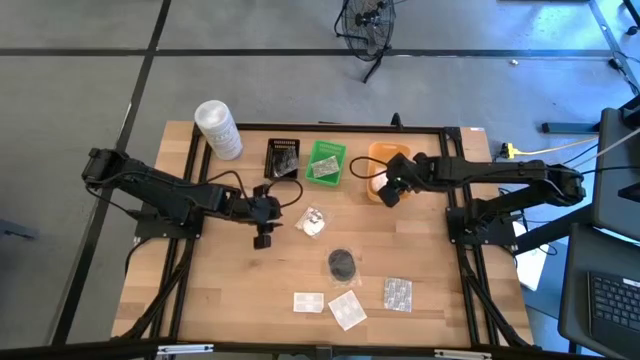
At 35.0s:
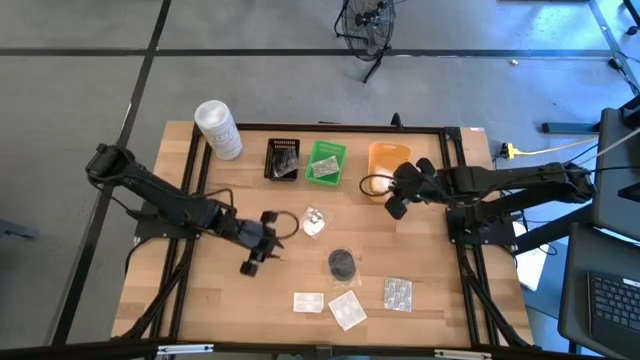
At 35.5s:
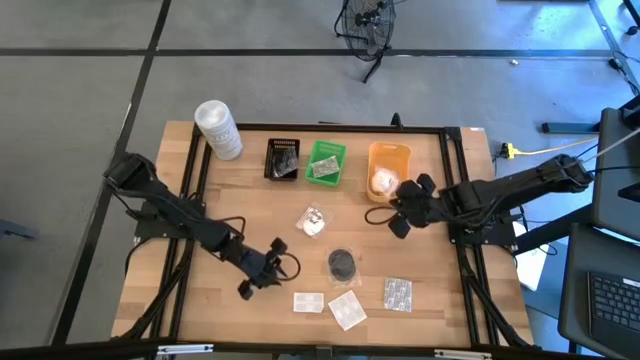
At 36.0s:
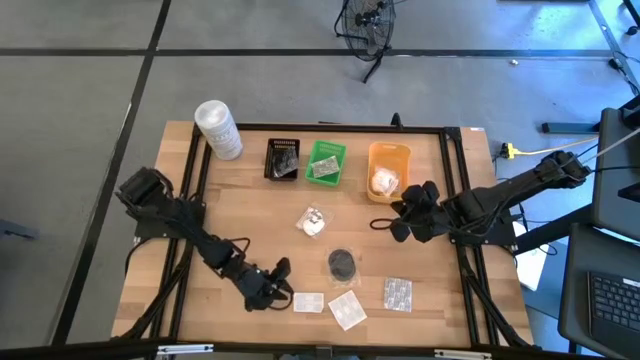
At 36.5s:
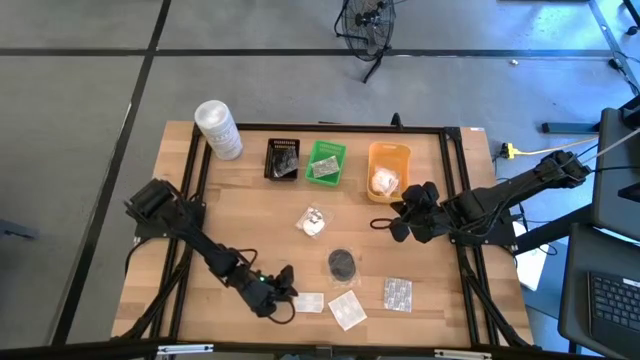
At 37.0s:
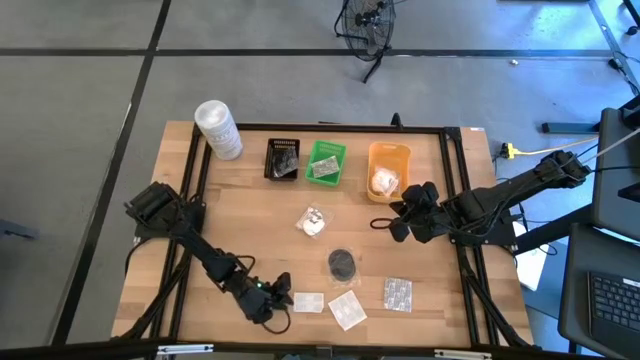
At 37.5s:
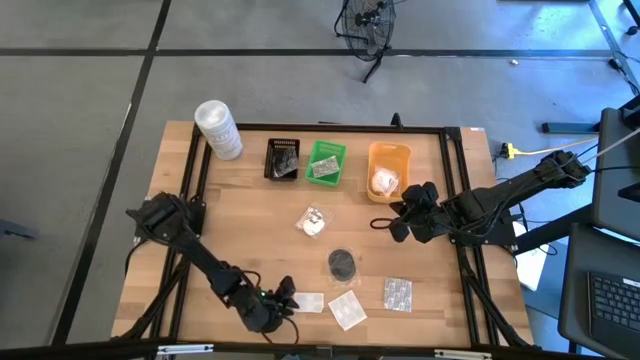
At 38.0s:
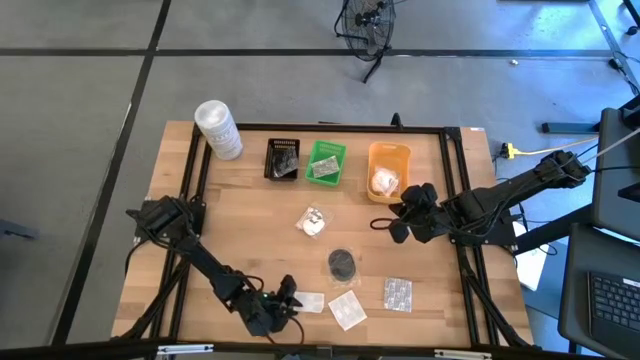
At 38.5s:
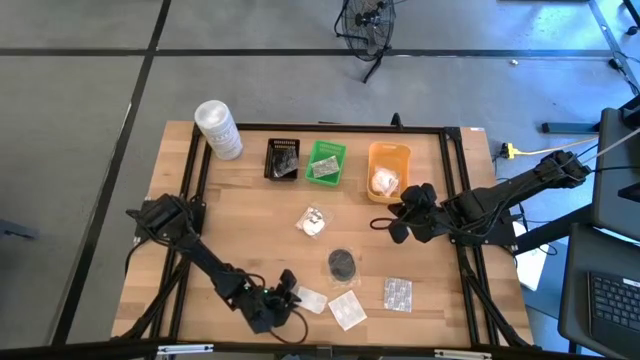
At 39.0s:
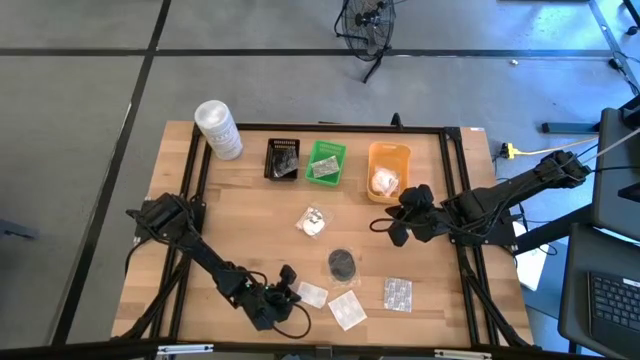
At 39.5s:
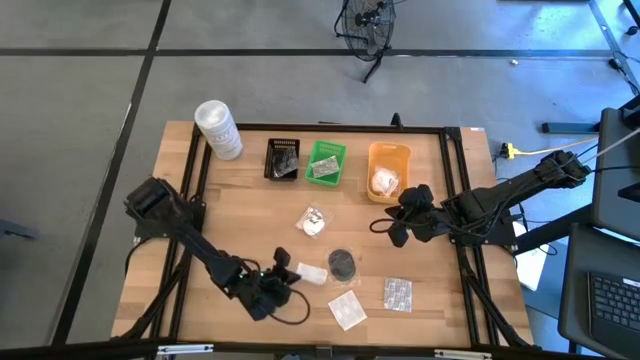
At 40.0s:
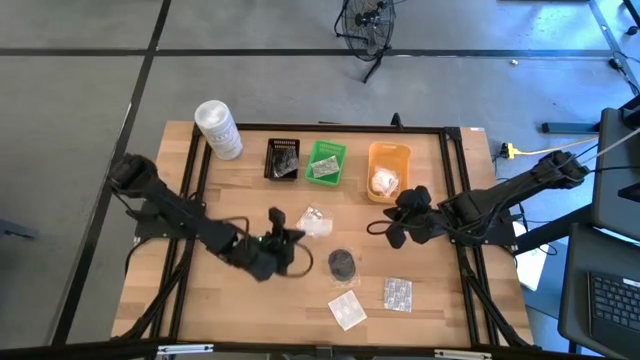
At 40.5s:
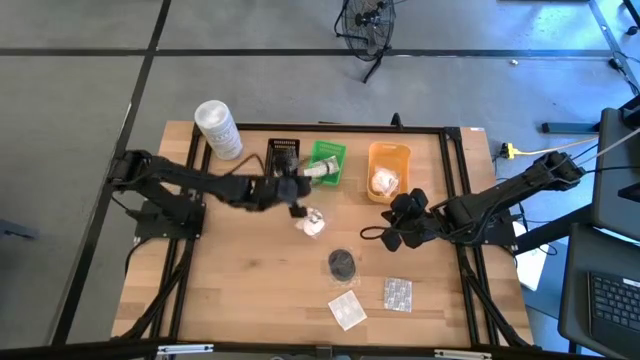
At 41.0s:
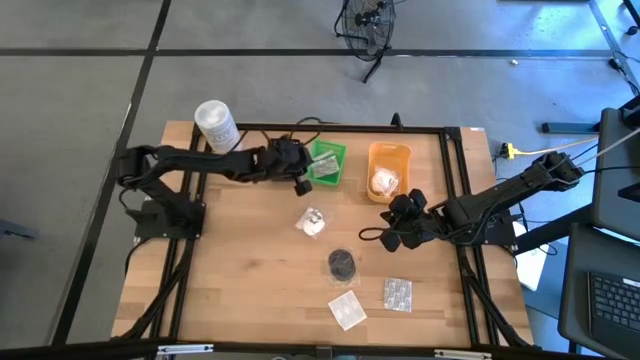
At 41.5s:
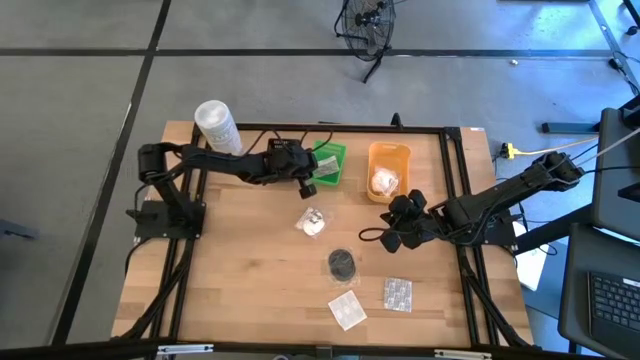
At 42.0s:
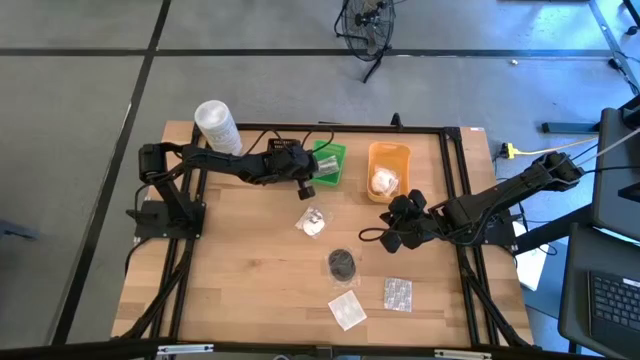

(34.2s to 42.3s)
Task: Pick & Place Travel size toiletries
Put the white bandage pack into the green bin

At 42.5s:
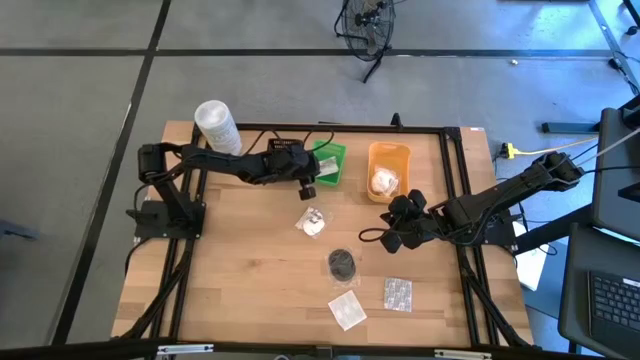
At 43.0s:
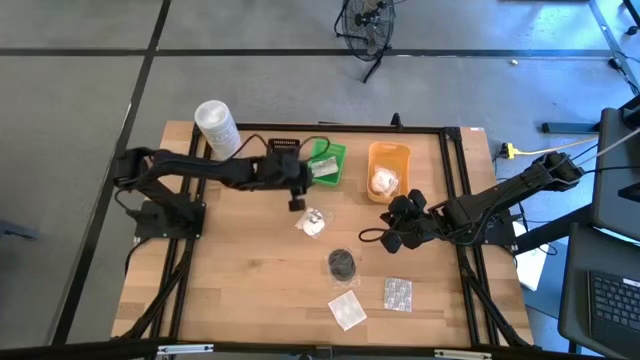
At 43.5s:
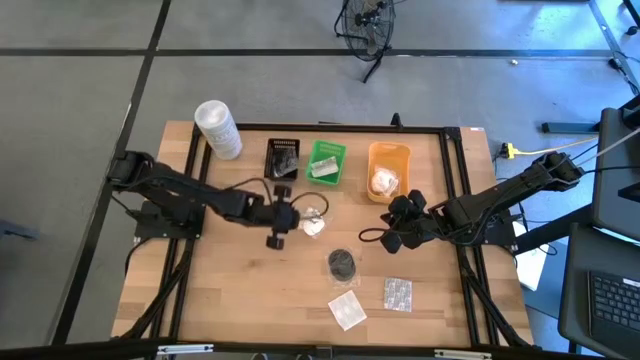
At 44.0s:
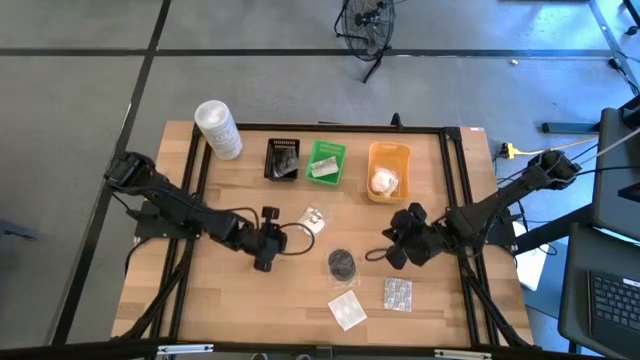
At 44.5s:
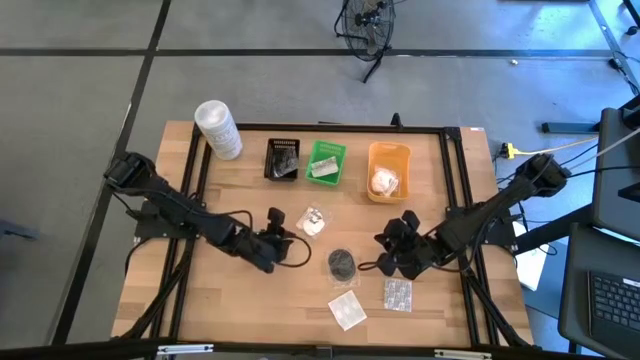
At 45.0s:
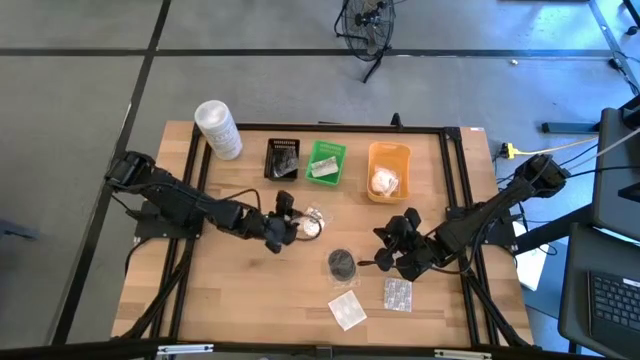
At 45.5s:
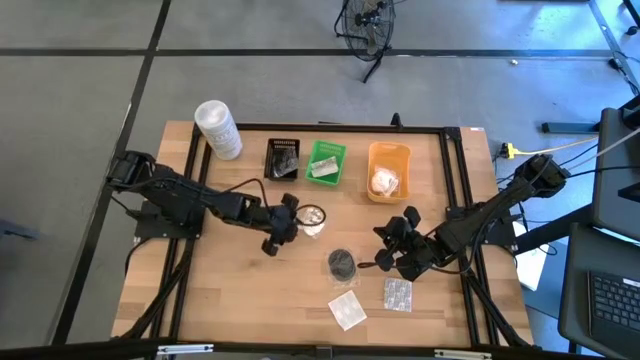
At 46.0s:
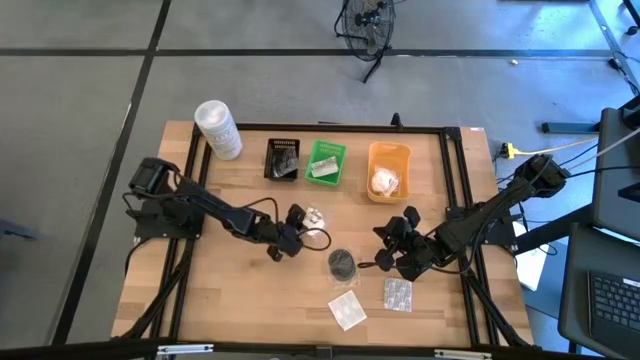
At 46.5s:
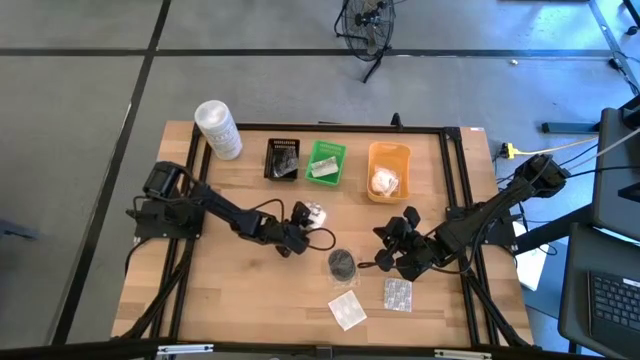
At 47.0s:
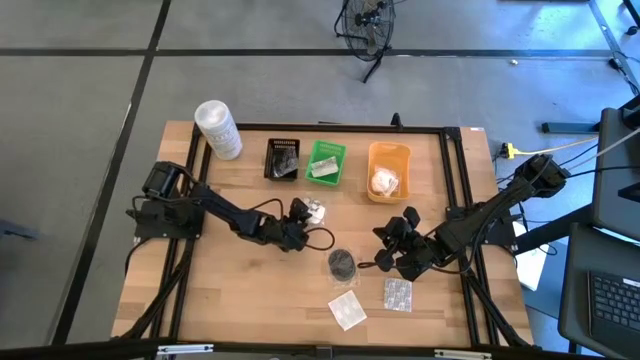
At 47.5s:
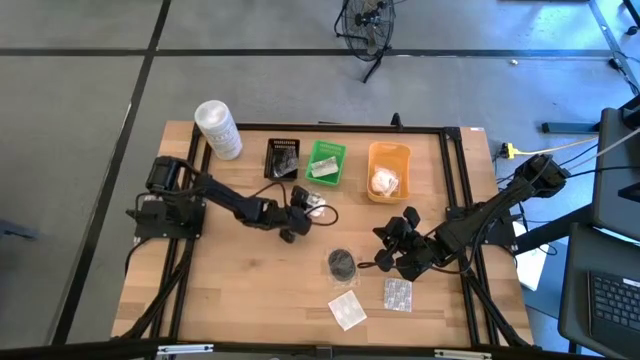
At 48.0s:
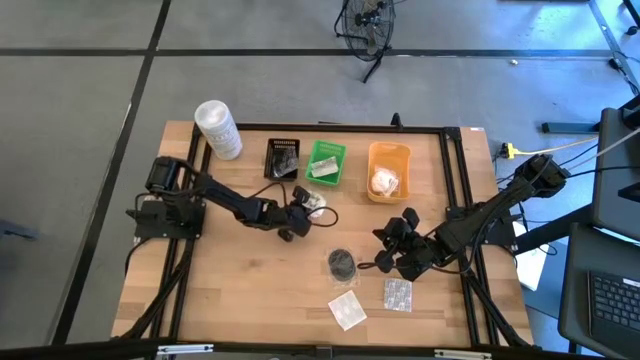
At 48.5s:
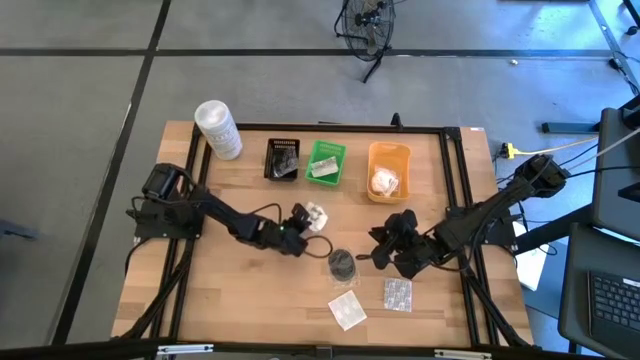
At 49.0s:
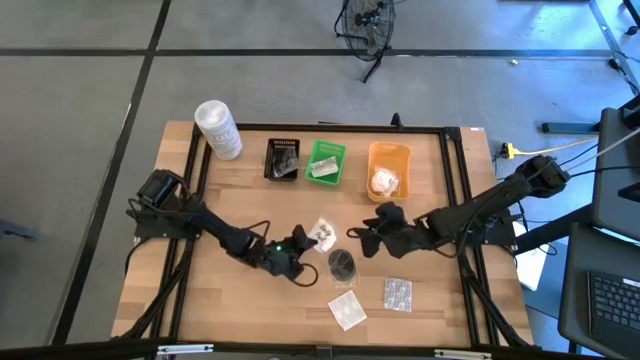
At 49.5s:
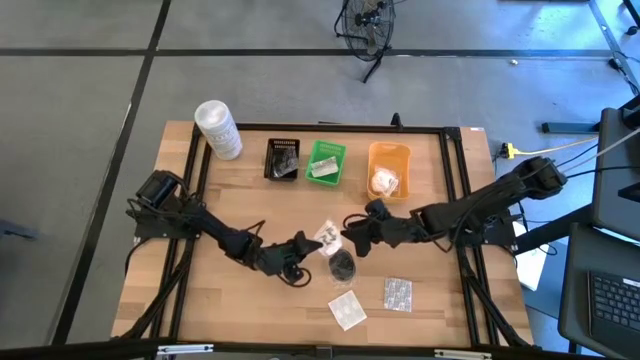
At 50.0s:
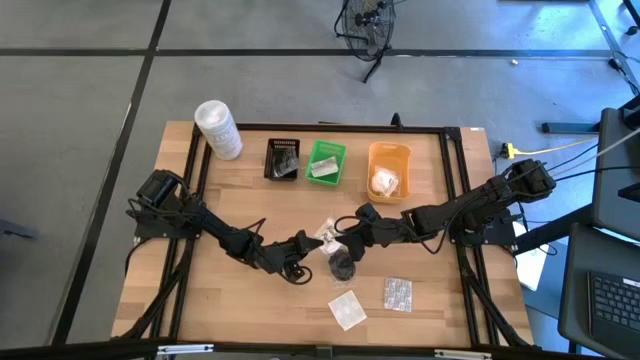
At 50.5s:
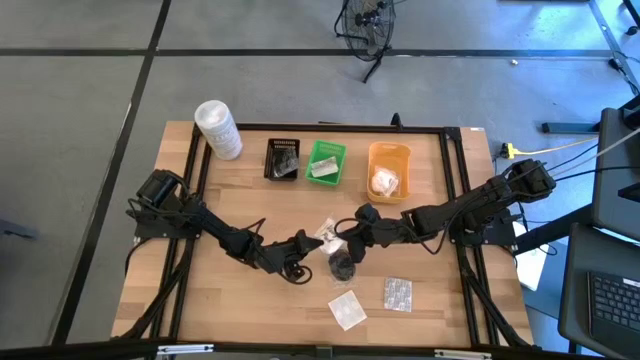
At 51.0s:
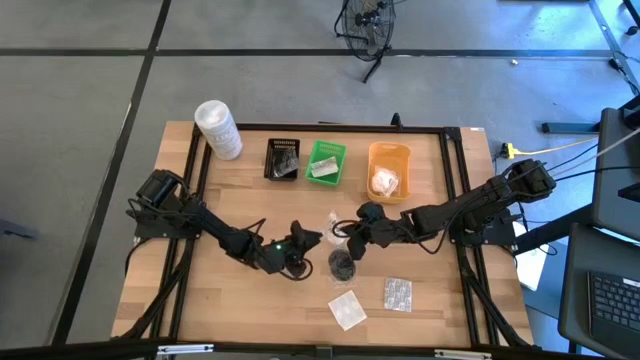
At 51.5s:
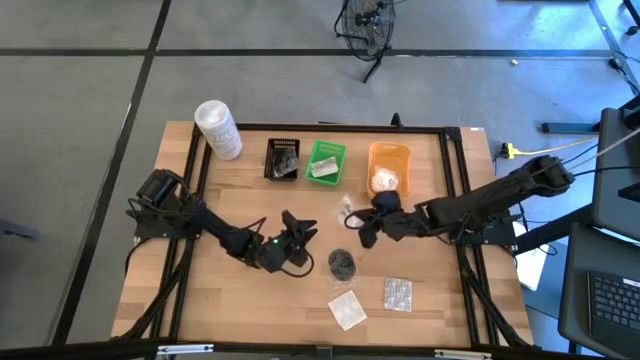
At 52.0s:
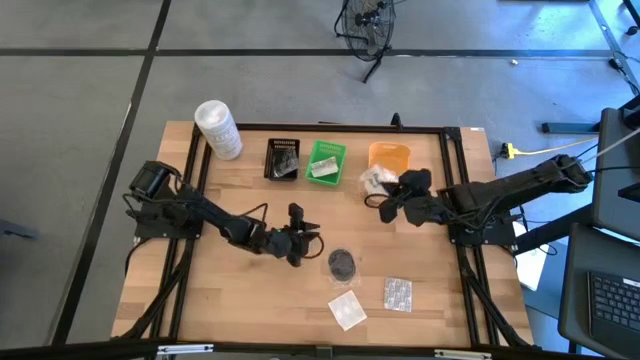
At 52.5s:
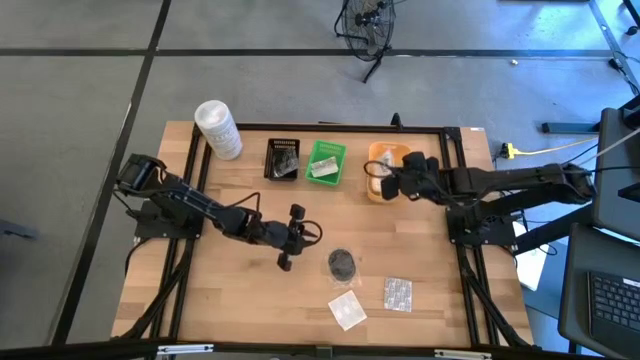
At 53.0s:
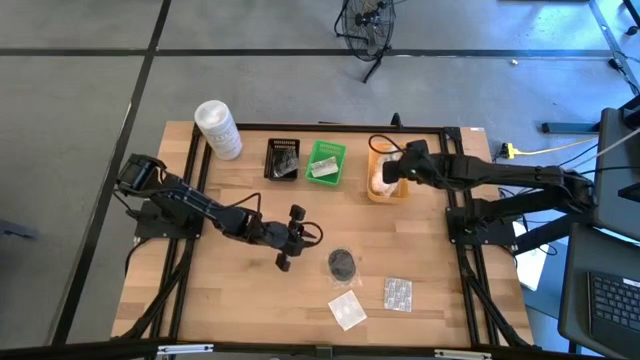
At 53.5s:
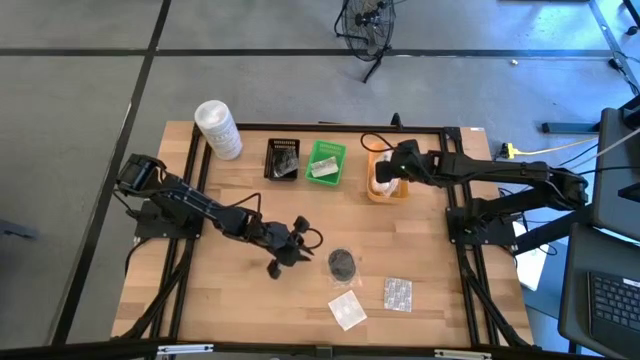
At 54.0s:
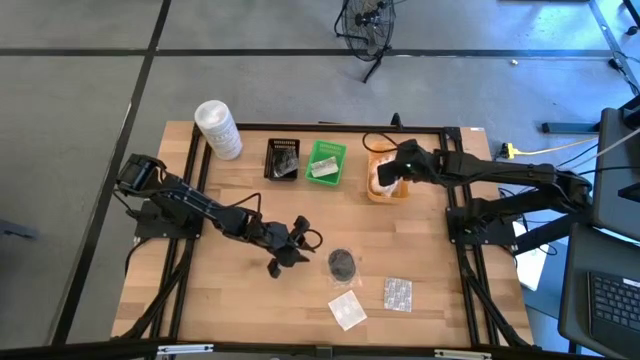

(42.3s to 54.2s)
Put the white cotton pack into the yellow bin
